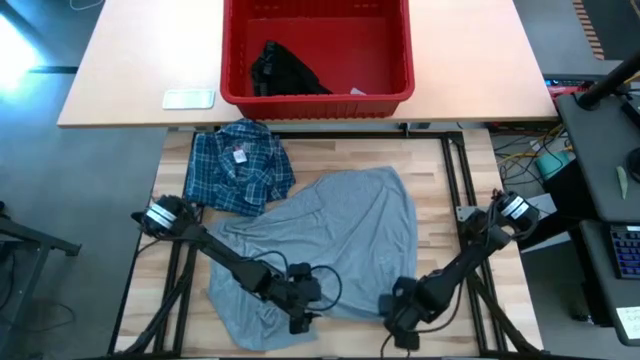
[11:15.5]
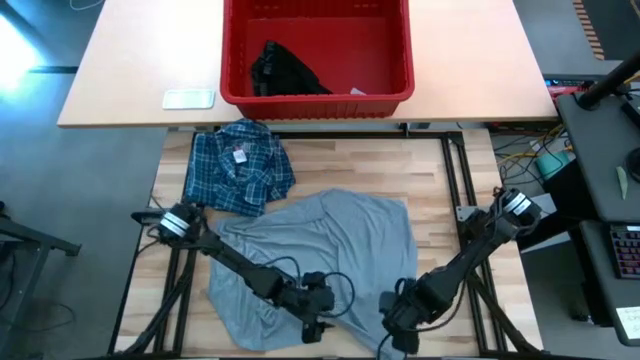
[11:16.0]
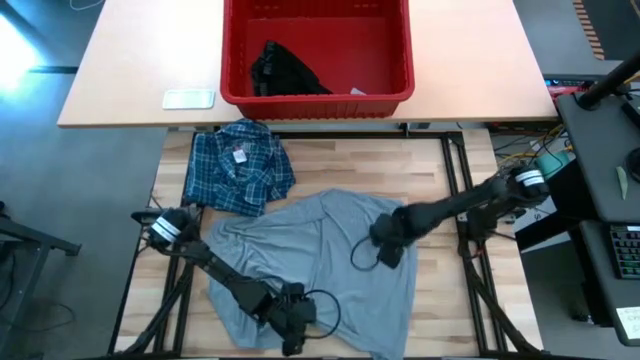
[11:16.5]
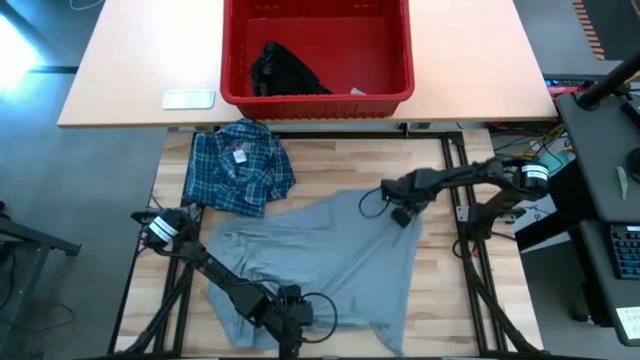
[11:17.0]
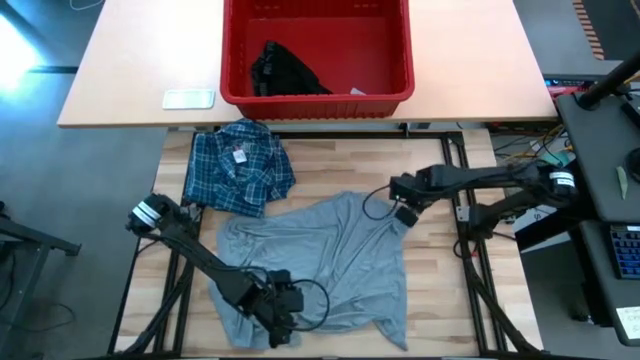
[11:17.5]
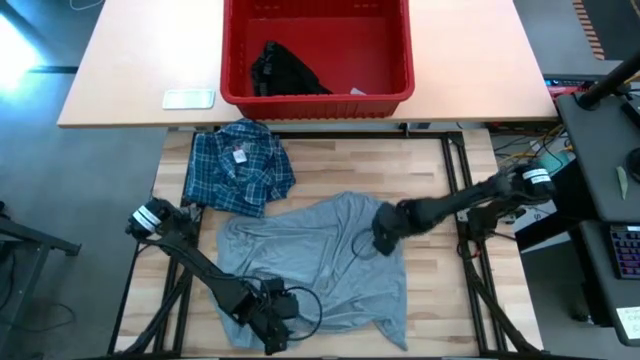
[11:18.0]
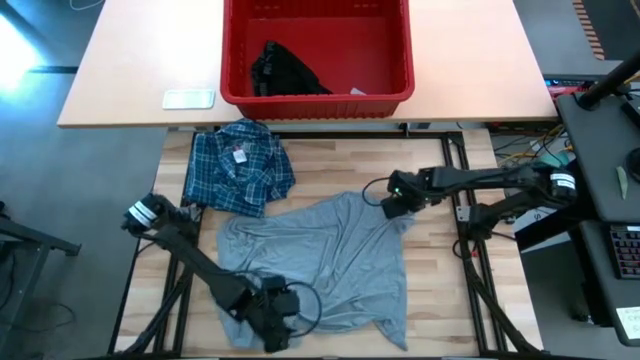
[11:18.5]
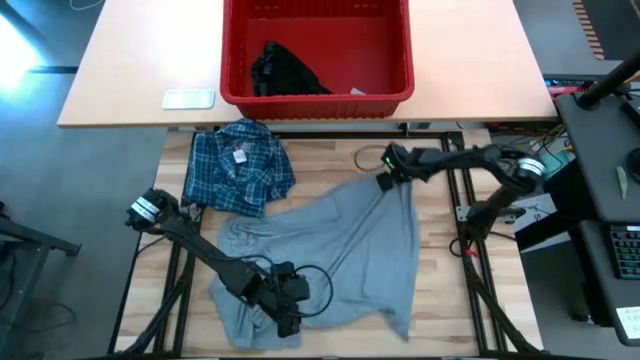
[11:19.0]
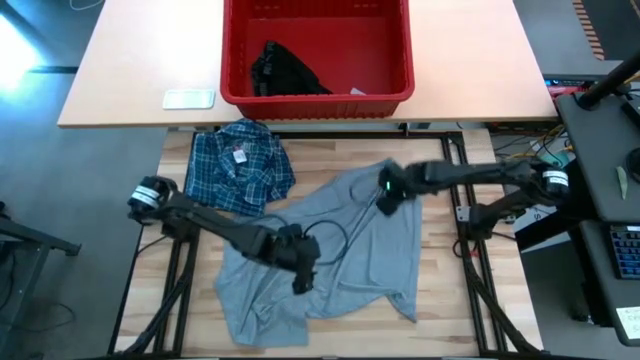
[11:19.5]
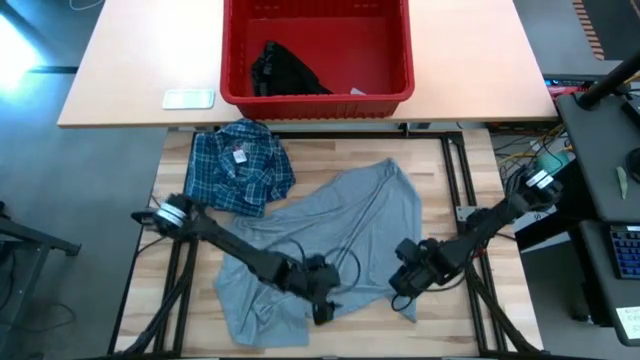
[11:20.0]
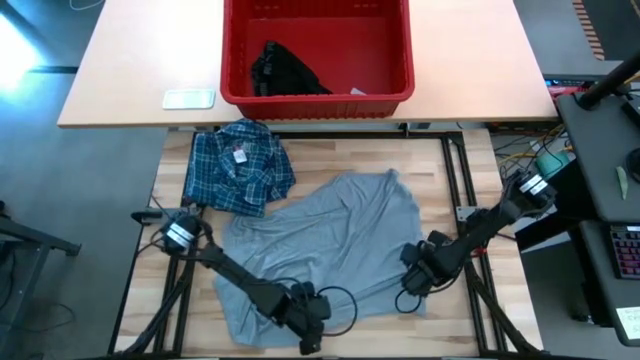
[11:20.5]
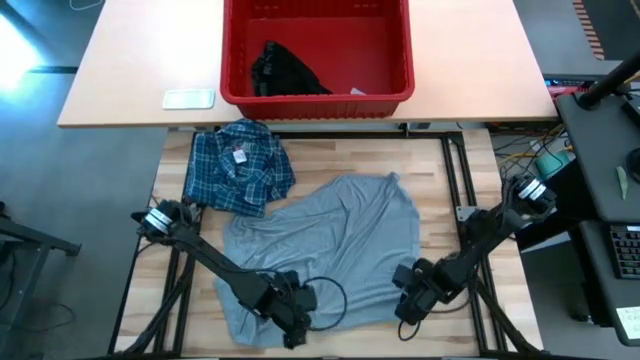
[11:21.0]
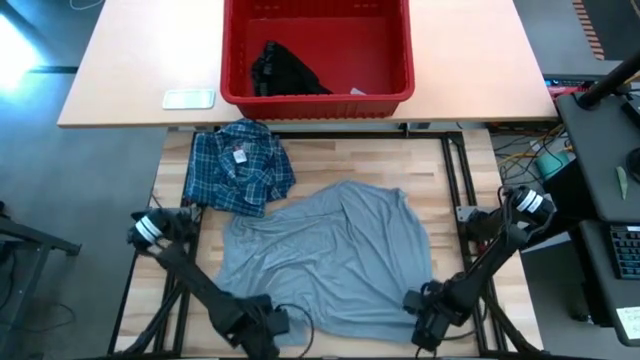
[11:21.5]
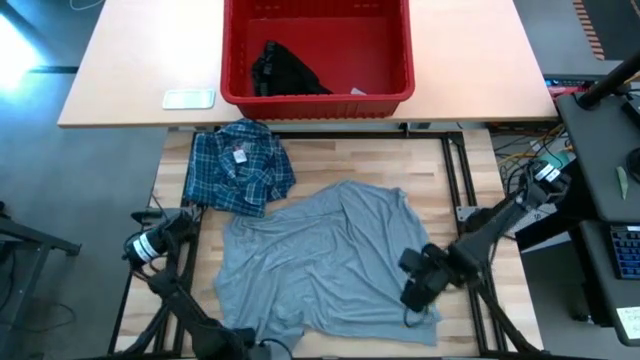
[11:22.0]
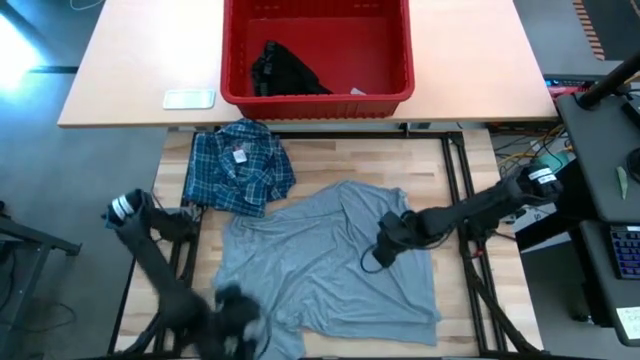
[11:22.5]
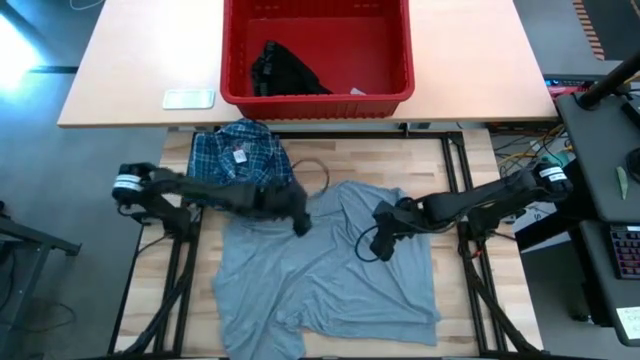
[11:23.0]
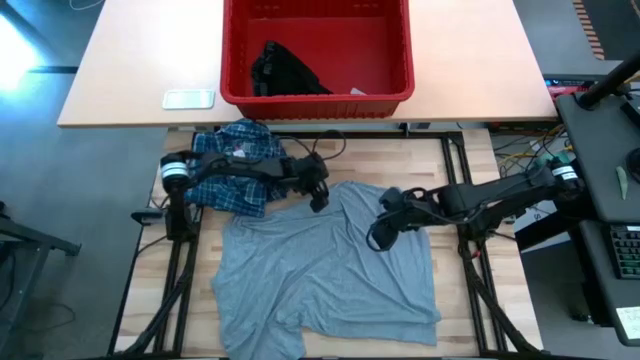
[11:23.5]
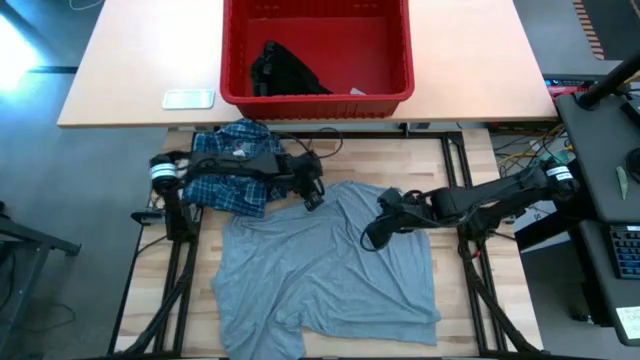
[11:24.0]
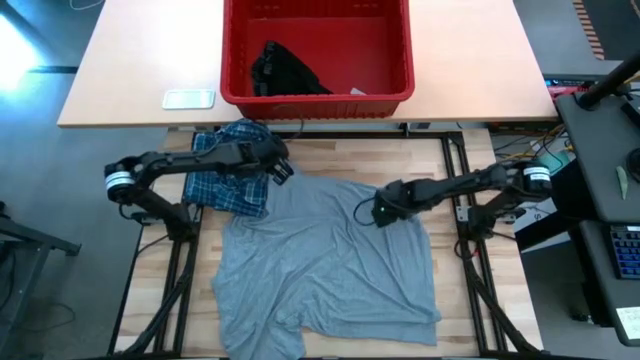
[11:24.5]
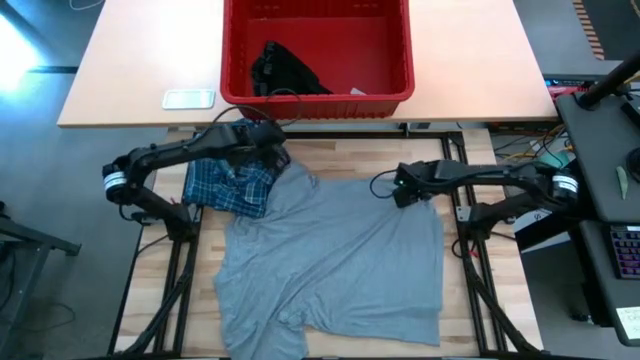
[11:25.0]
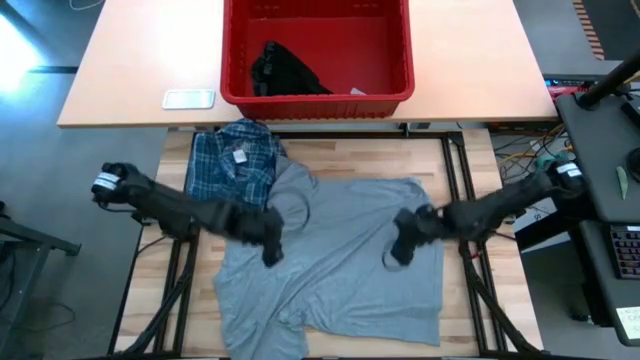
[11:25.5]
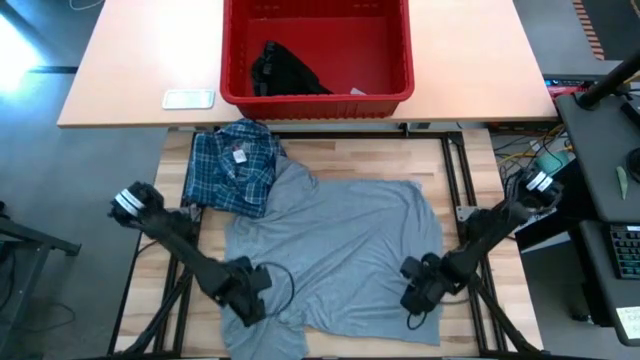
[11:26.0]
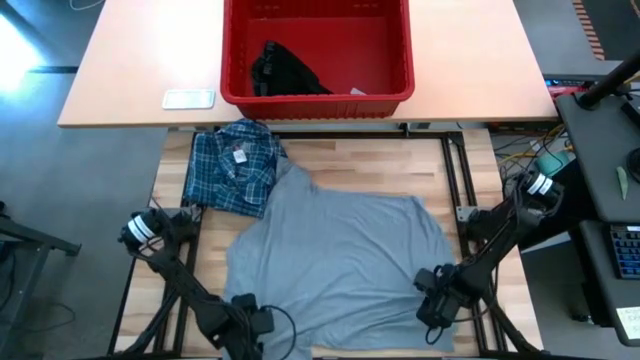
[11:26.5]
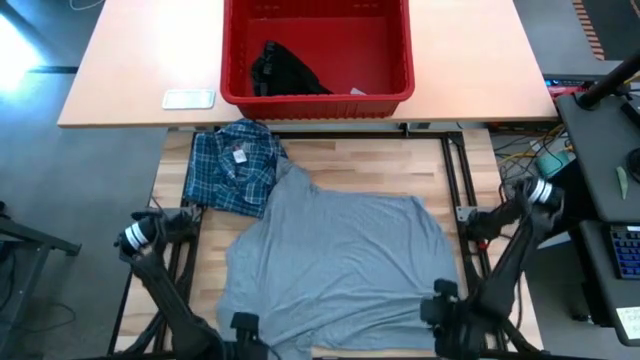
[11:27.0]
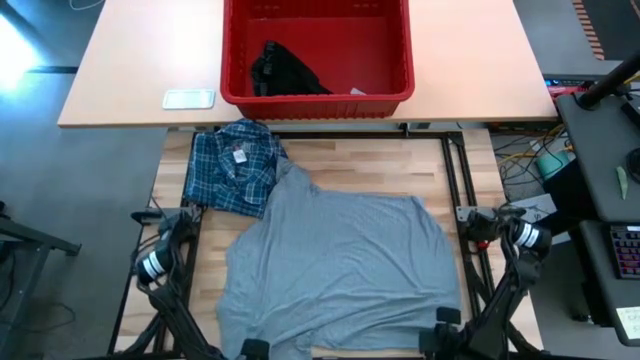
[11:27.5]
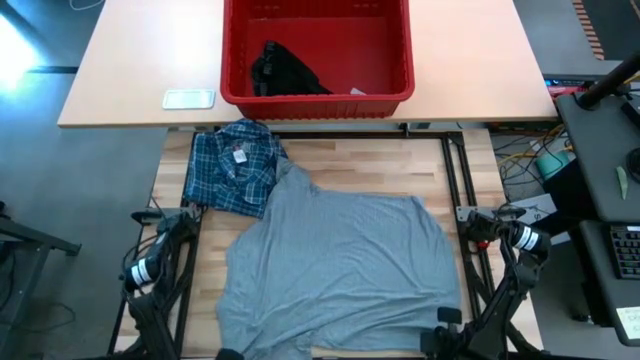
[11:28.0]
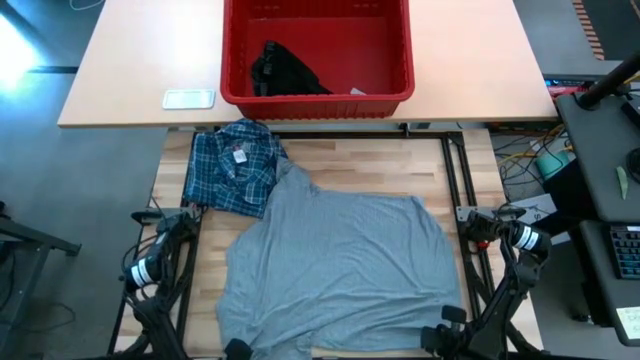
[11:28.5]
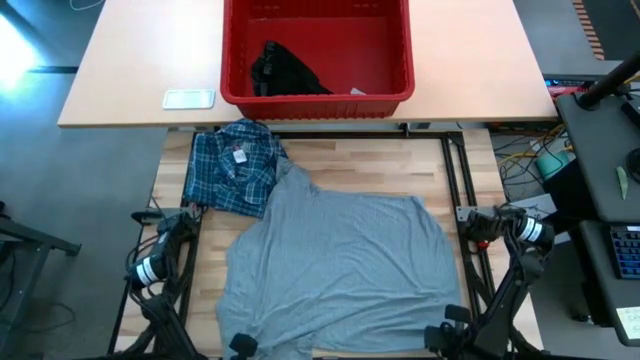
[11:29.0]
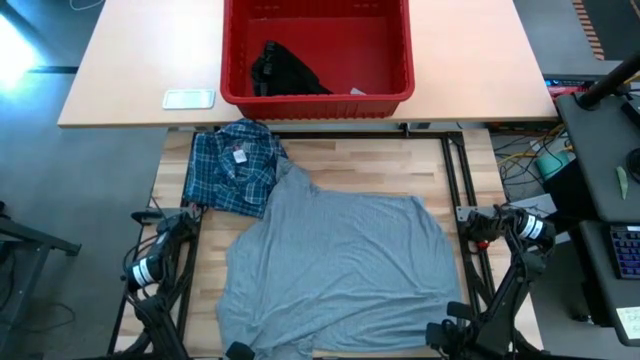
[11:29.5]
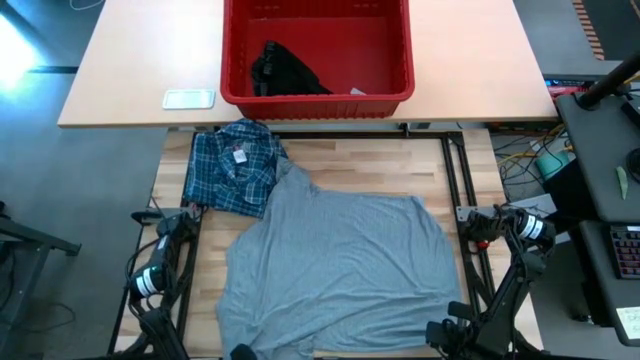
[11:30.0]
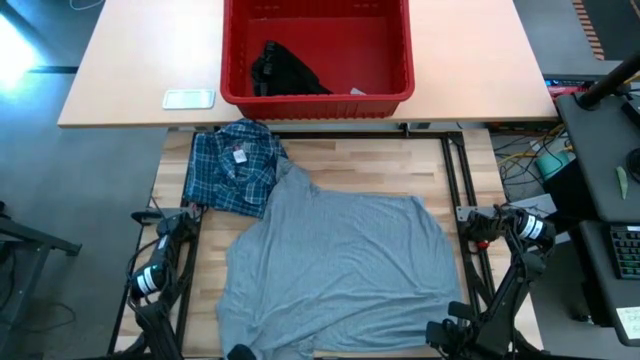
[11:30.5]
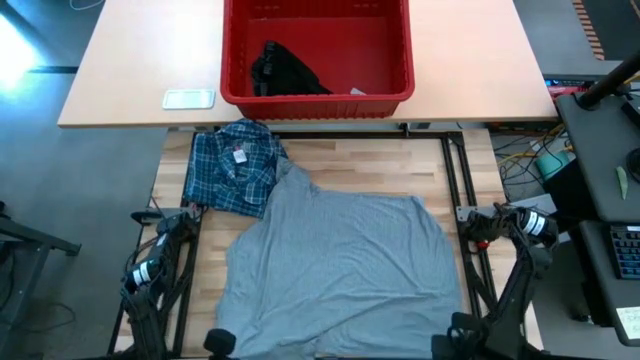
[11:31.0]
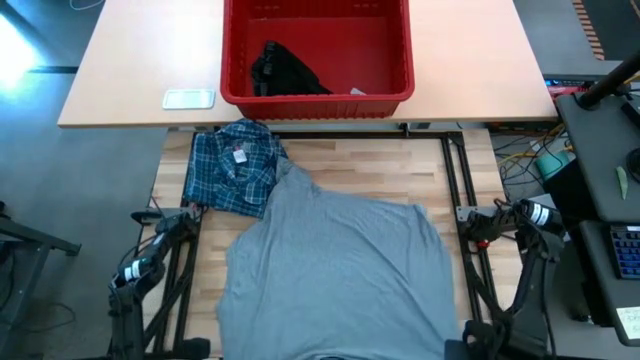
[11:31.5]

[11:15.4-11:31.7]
Task: Fold Laundry from Bin
Fold the gray shirt

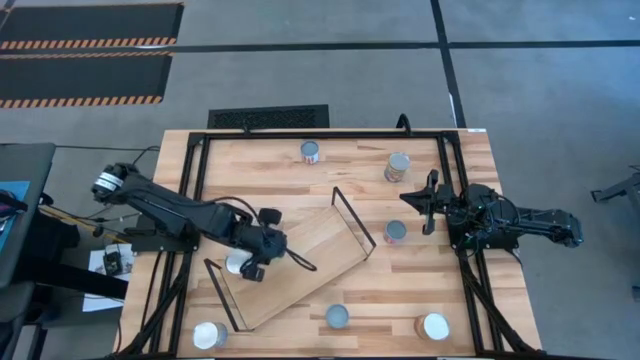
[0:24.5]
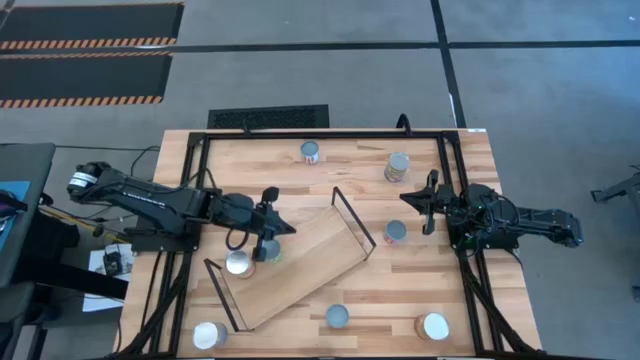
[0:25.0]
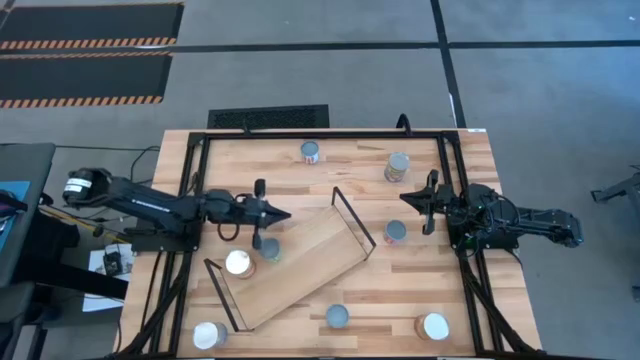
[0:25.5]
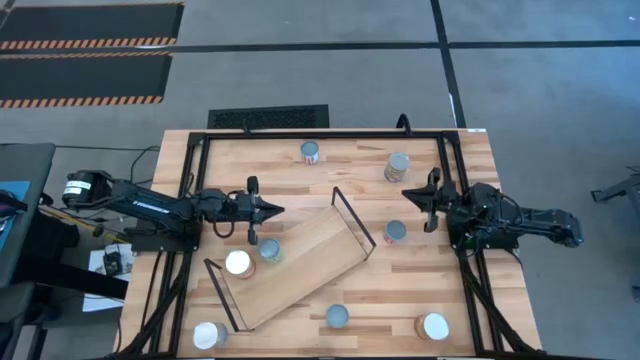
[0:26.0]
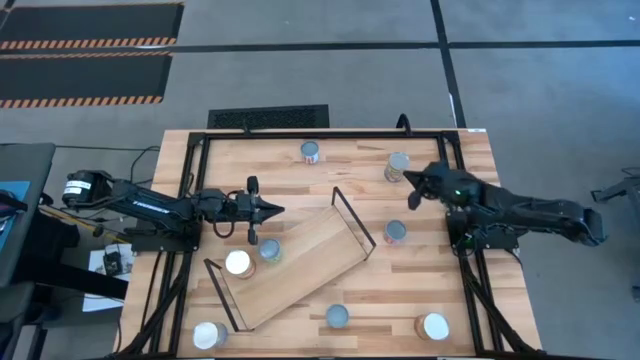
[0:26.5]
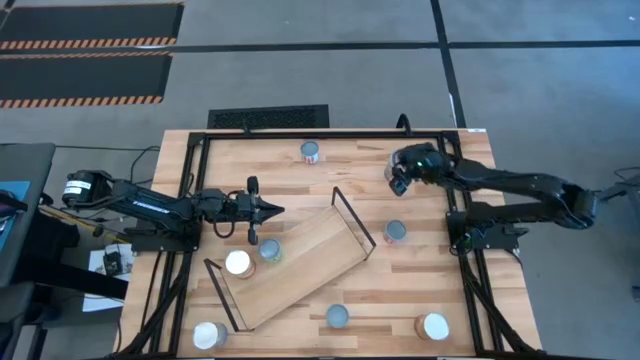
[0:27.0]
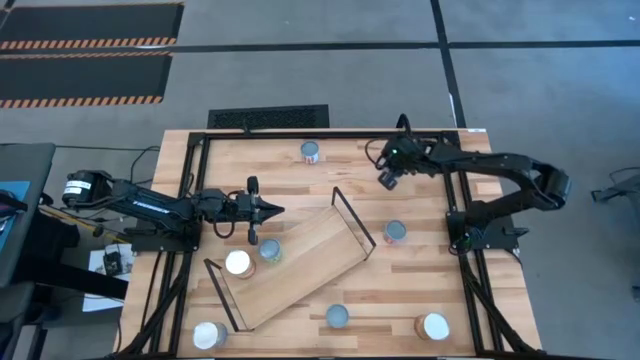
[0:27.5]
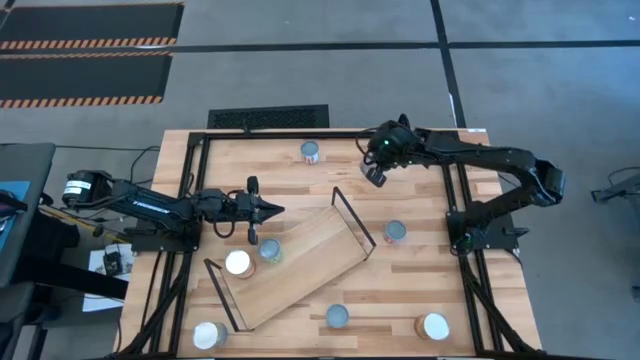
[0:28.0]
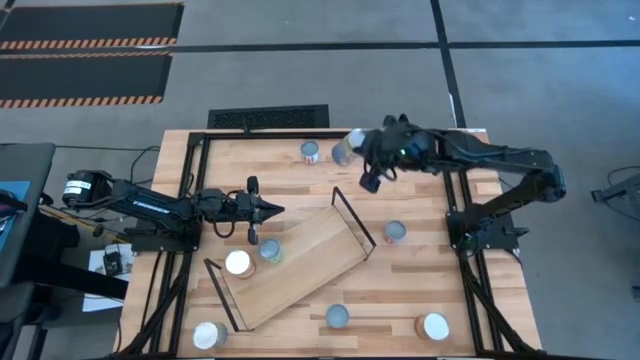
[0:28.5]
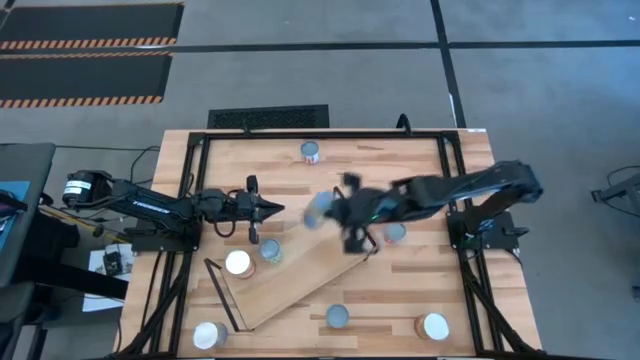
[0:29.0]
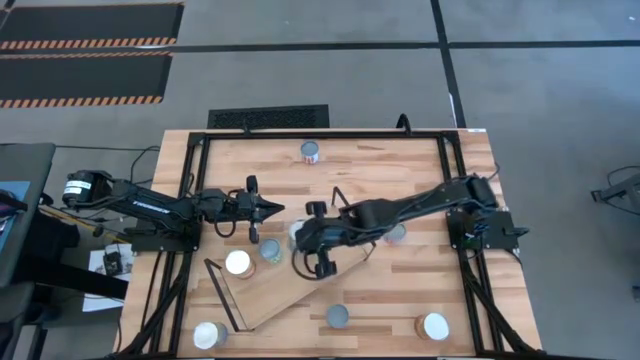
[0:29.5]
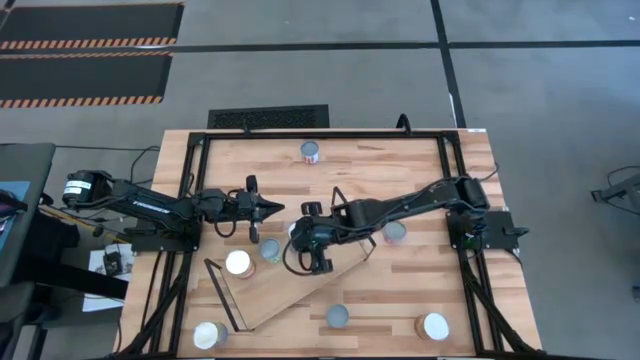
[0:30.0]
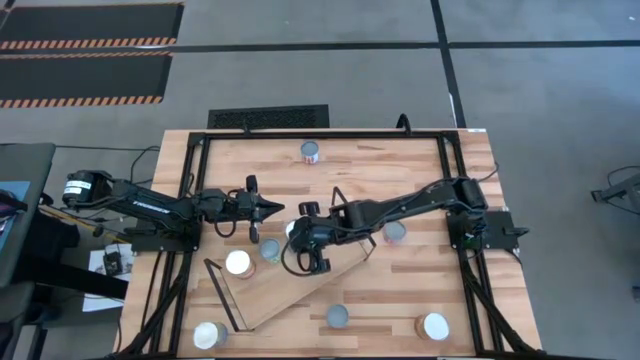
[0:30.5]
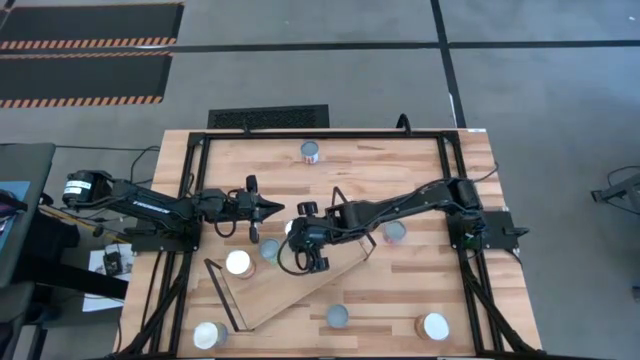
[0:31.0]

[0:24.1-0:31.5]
Task: Pick and place cans onto a shelf
Put the top canned peaches on the shelf
